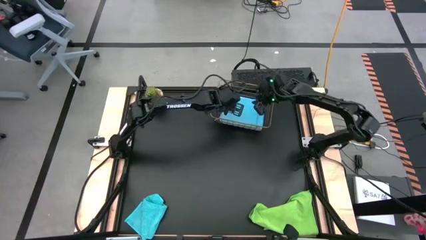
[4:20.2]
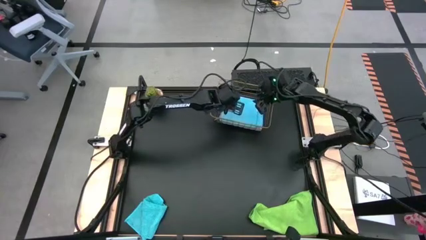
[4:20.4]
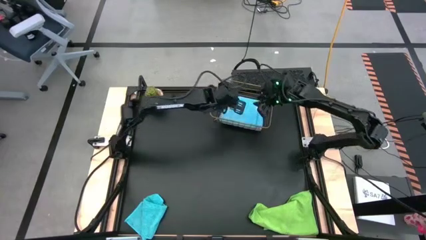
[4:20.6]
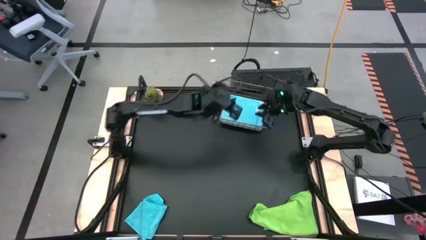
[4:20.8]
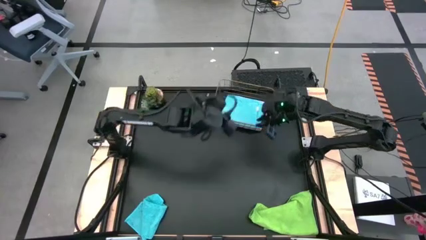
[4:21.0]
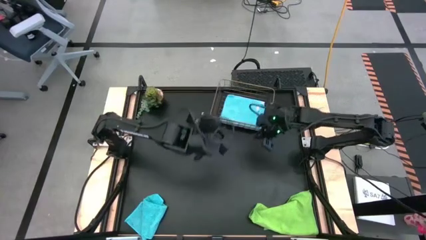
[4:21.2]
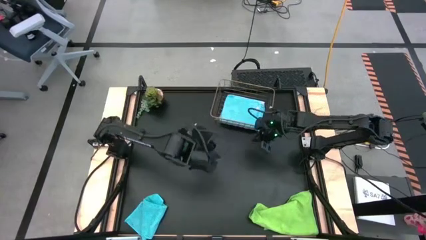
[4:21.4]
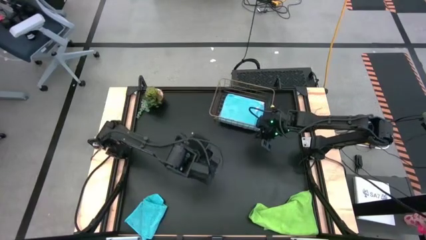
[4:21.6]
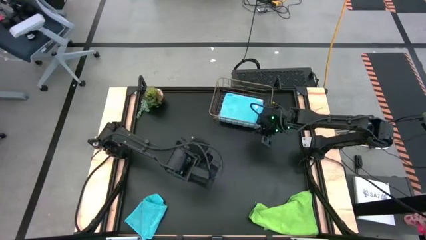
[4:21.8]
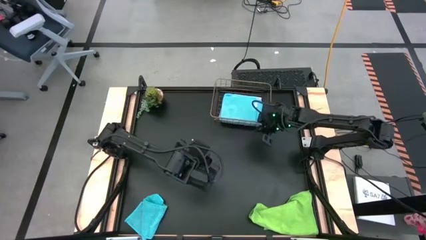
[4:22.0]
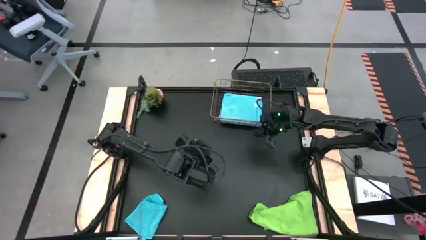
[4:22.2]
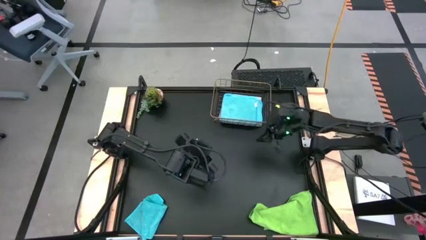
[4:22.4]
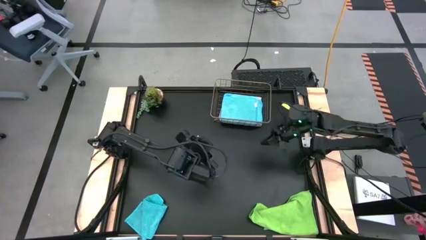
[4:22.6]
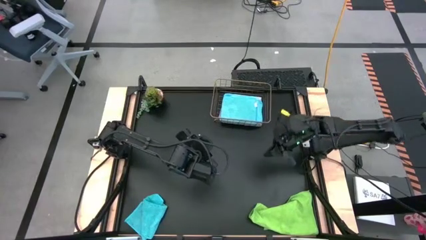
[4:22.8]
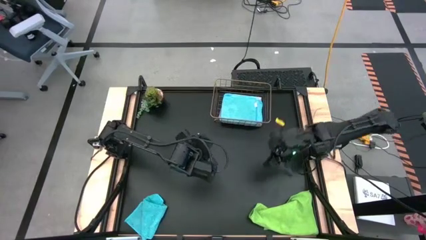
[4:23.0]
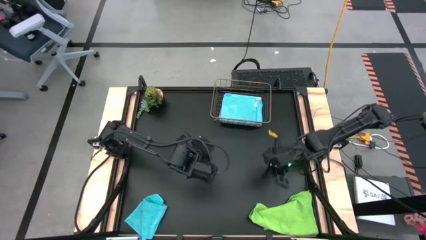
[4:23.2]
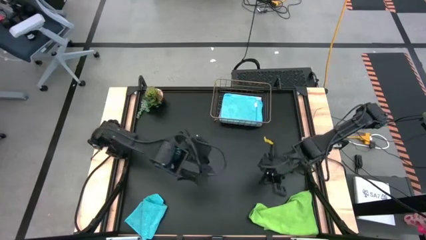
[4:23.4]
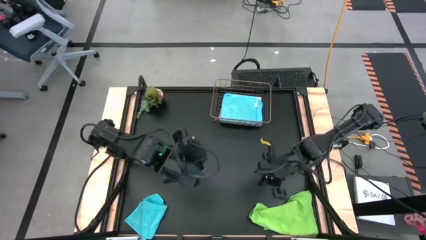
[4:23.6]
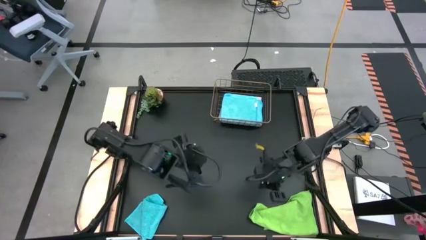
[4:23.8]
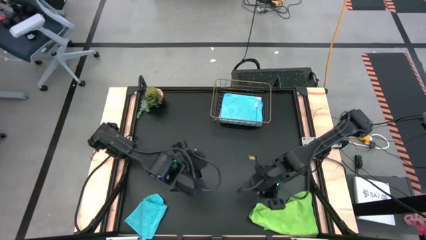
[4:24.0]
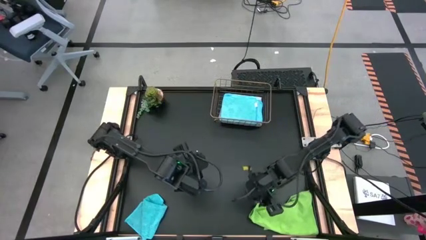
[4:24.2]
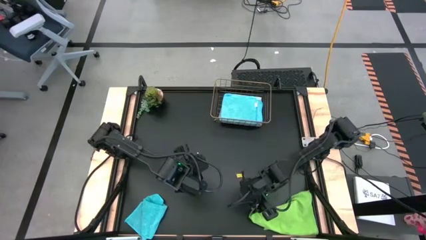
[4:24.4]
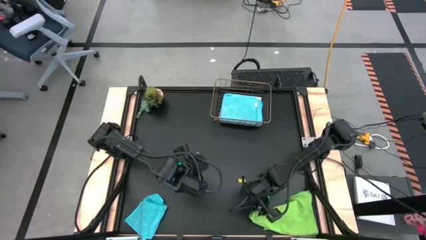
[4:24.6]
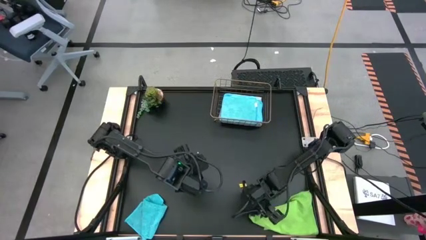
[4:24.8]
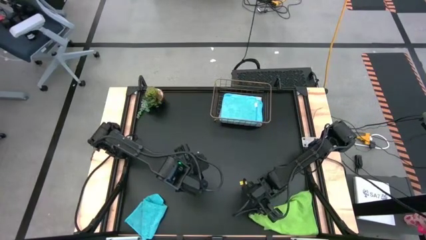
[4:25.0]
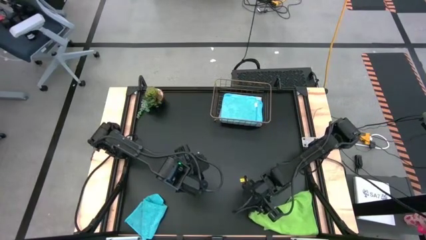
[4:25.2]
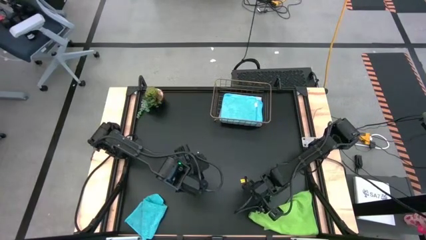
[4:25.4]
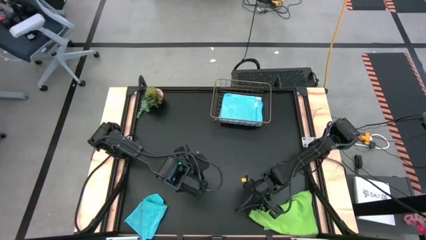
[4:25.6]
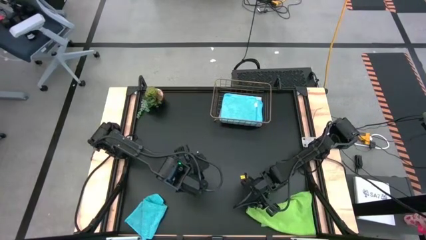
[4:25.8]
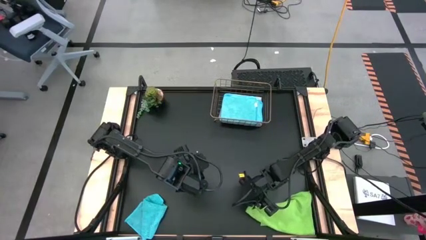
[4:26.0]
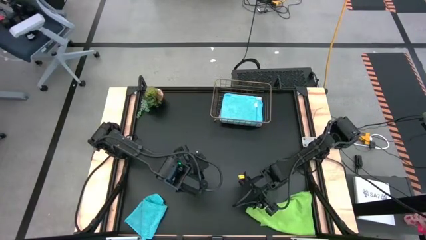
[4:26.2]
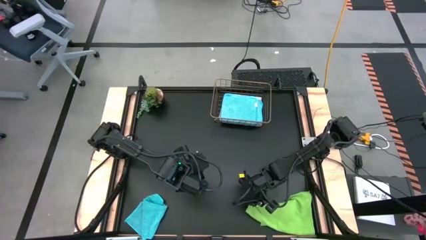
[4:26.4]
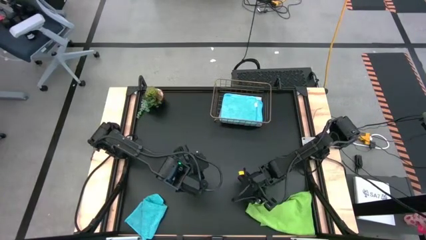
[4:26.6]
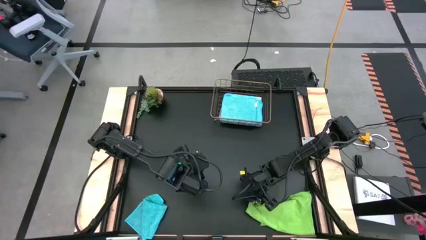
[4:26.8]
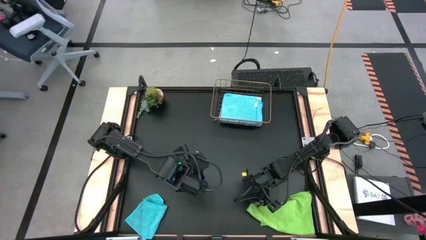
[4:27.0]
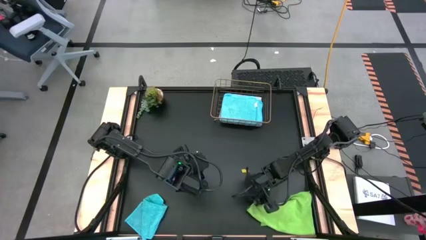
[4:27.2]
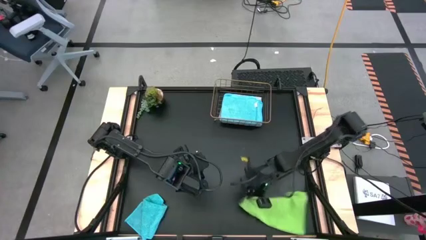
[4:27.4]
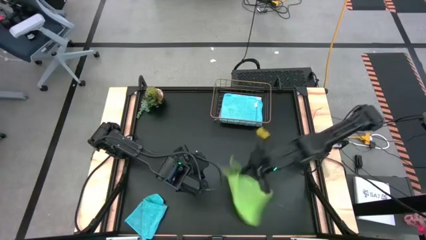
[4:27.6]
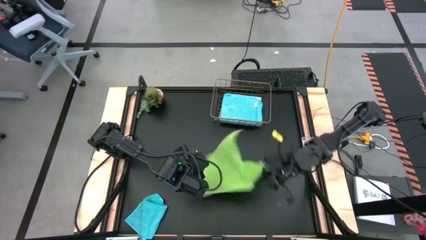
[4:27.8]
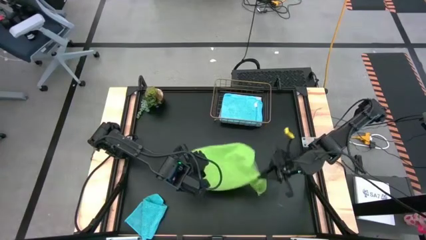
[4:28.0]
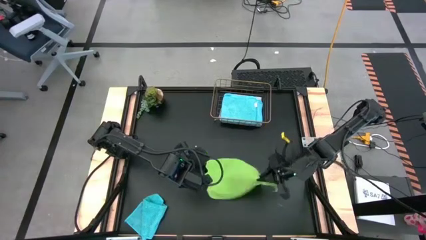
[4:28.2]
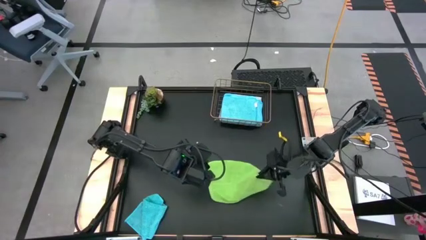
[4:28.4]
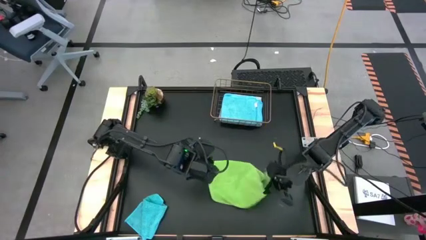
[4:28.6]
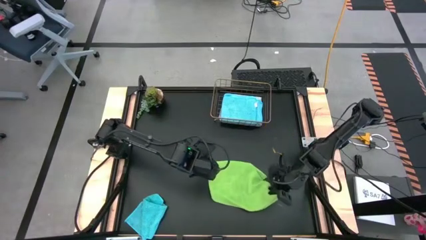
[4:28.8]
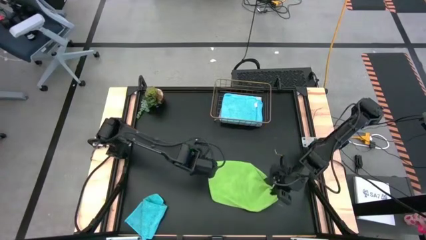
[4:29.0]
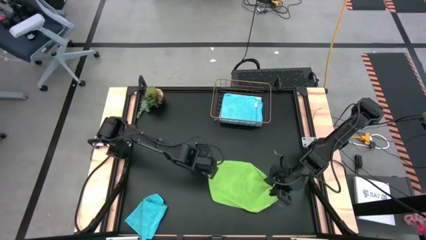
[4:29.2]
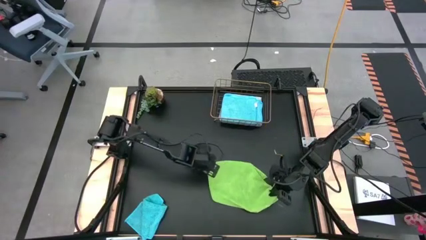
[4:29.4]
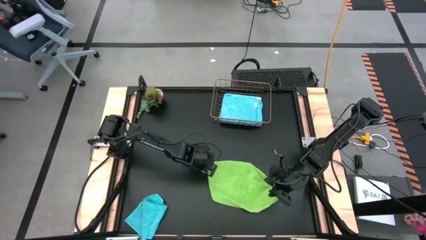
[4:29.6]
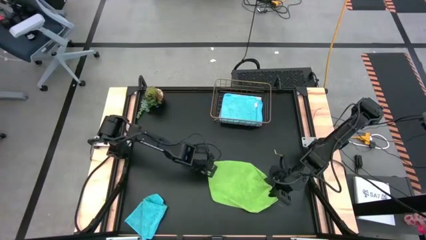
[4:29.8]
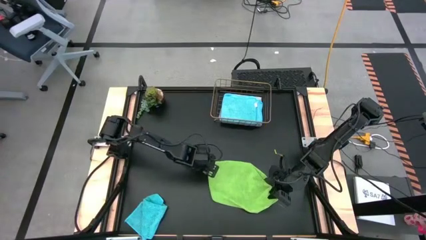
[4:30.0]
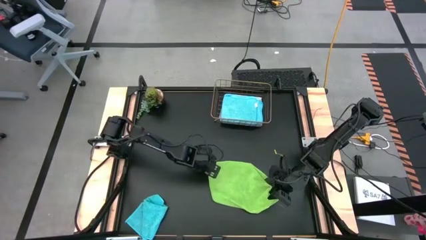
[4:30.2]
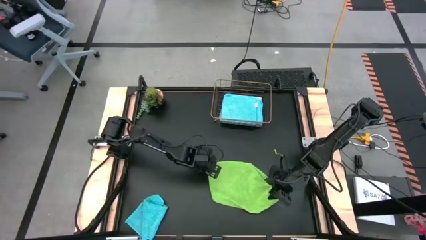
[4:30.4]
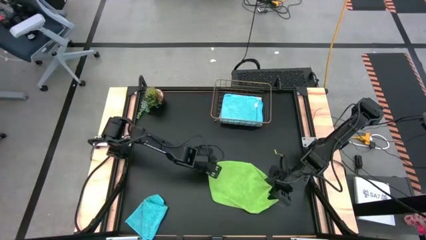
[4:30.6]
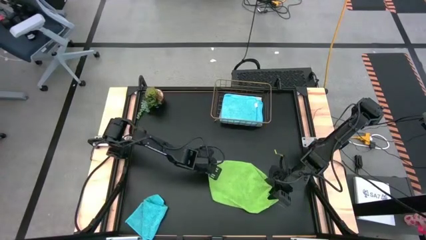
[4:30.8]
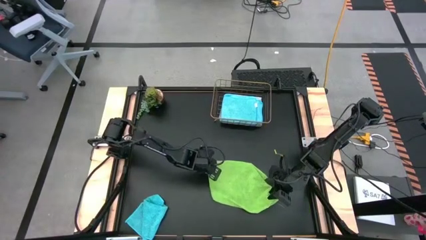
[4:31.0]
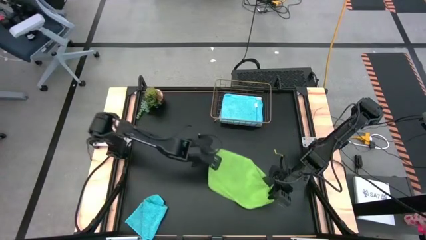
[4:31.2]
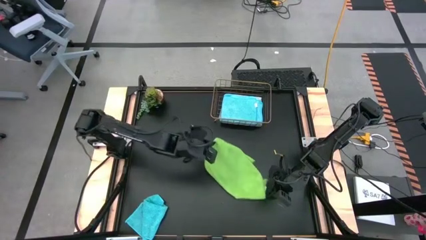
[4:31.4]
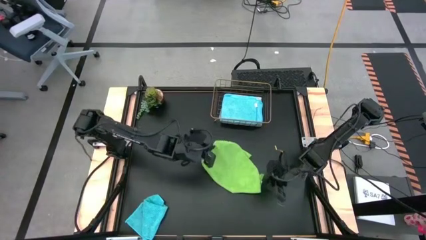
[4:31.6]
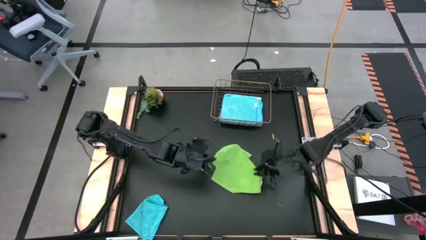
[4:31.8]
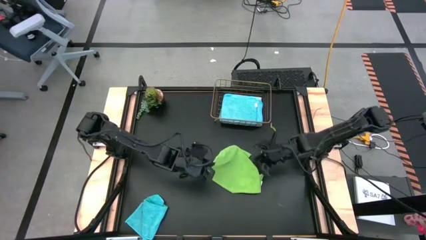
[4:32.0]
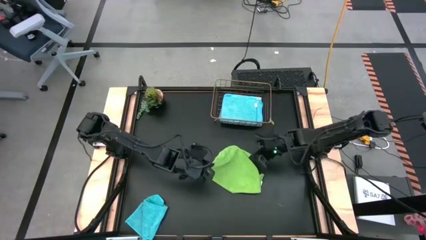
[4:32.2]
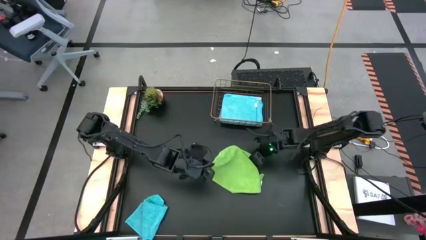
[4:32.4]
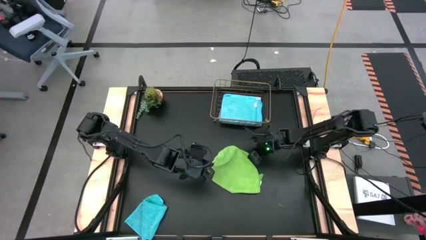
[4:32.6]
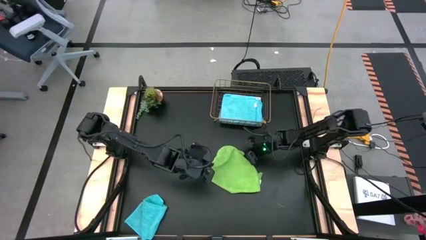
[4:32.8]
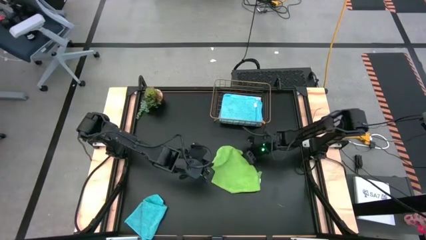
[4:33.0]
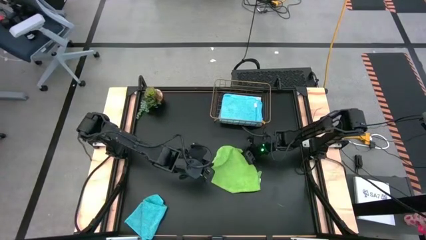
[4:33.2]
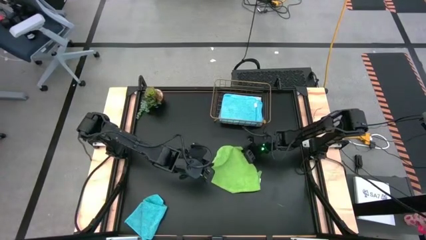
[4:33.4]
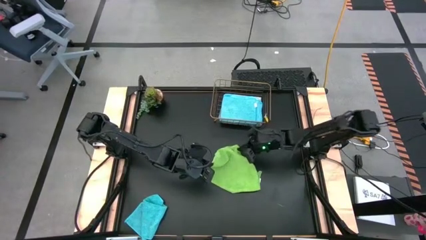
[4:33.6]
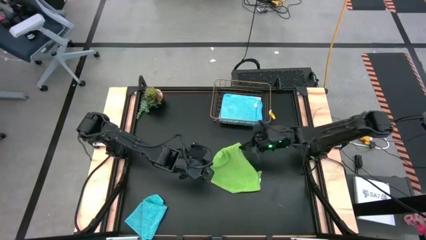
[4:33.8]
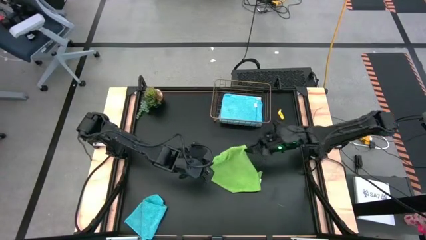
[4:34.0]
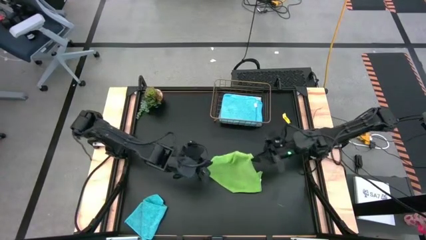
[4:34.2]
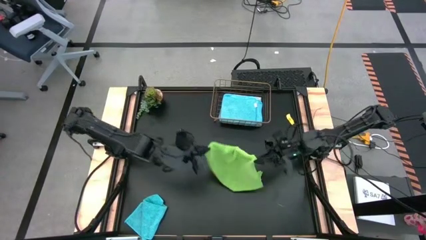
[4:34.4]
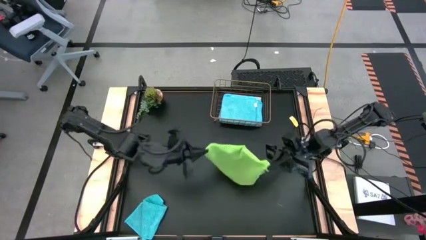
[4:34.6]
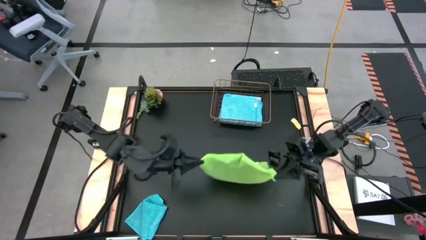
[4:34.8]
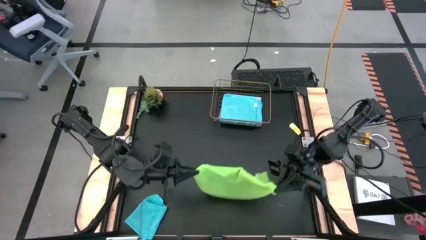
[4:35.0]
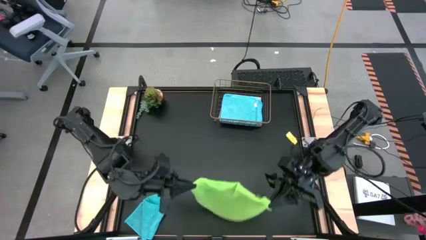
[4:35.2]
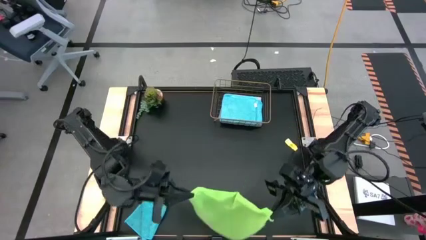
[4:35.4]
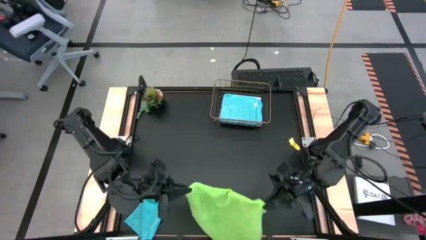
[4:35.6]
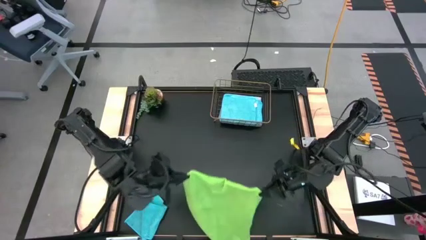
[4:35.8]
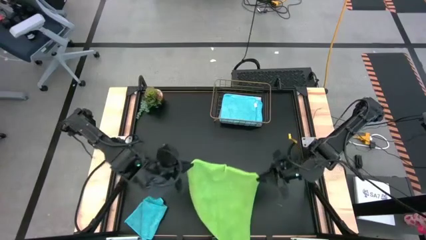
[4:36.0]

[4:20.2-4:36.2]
Task: Fold microfiber towels
Fold the green towel
